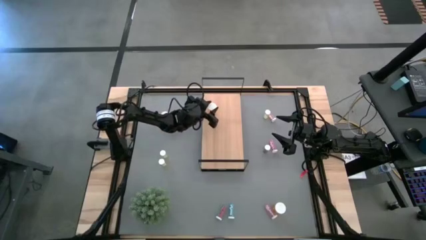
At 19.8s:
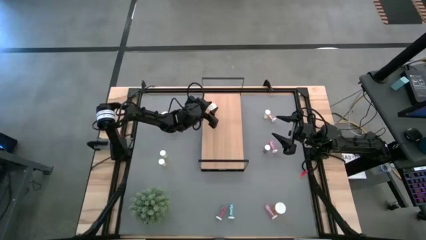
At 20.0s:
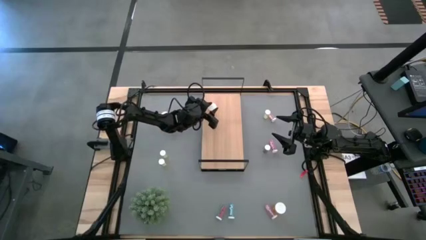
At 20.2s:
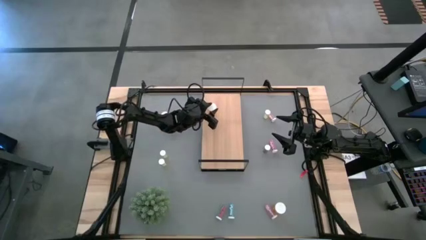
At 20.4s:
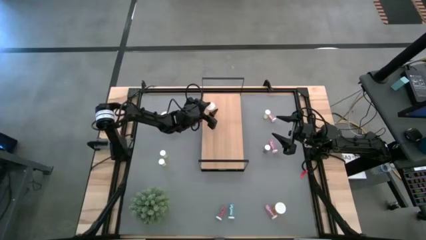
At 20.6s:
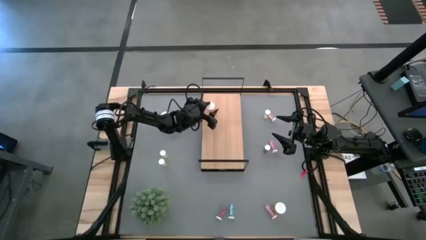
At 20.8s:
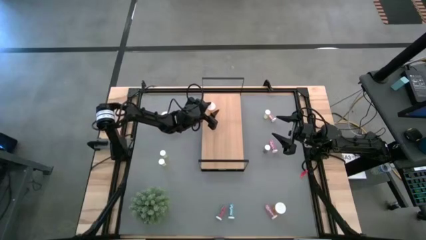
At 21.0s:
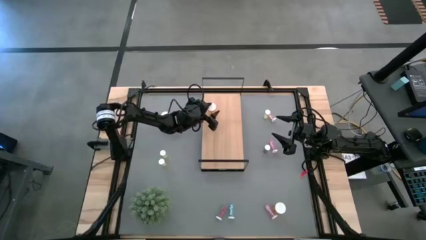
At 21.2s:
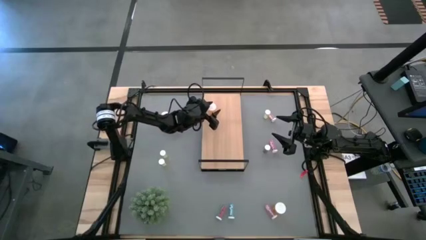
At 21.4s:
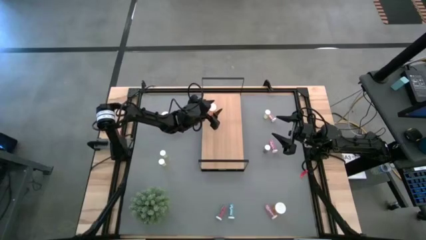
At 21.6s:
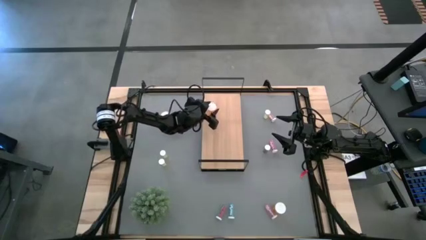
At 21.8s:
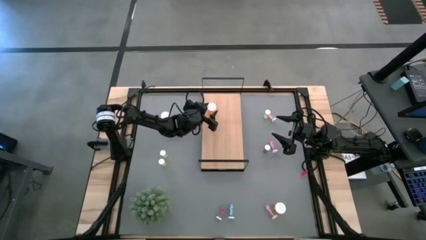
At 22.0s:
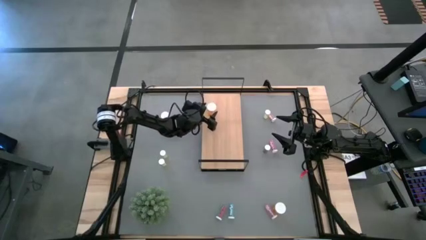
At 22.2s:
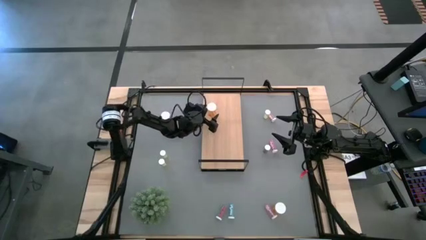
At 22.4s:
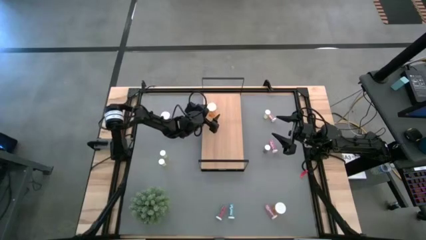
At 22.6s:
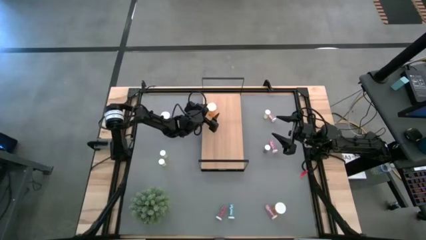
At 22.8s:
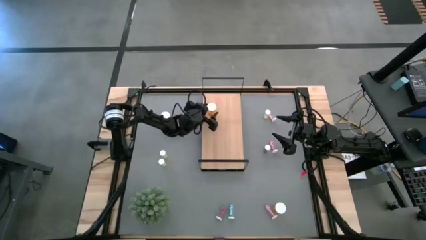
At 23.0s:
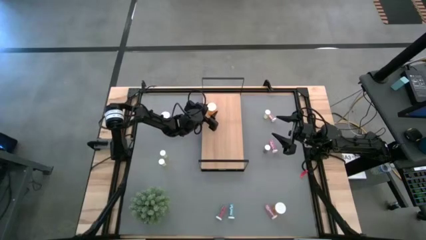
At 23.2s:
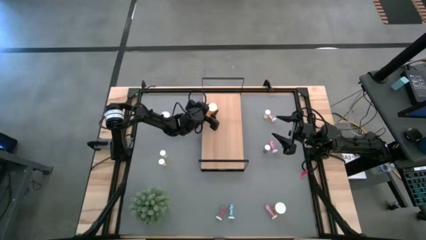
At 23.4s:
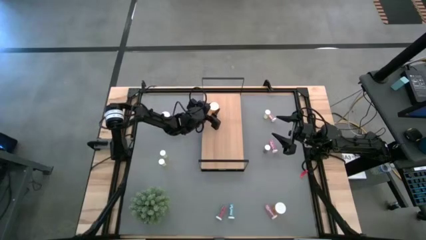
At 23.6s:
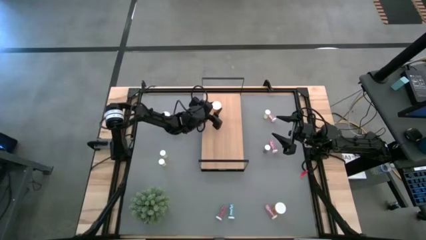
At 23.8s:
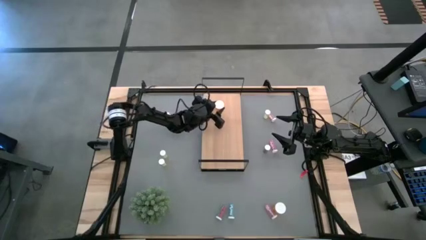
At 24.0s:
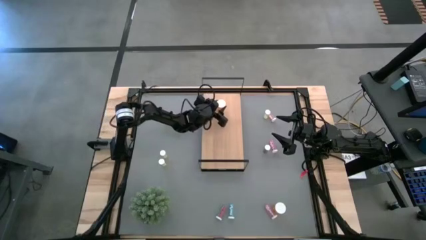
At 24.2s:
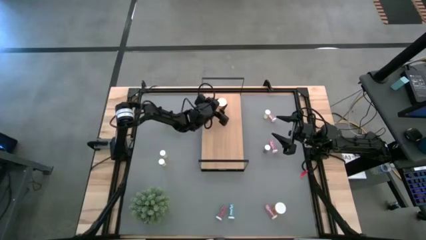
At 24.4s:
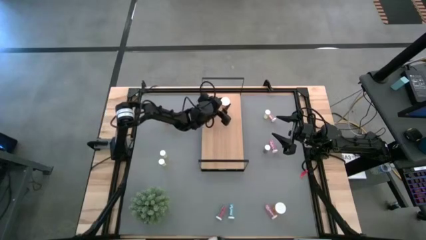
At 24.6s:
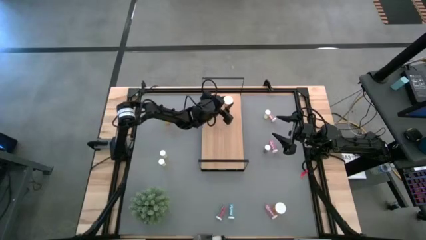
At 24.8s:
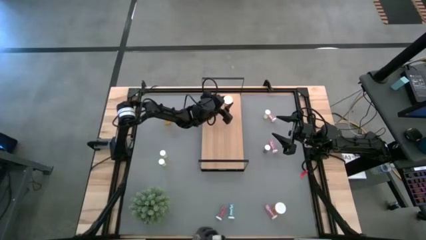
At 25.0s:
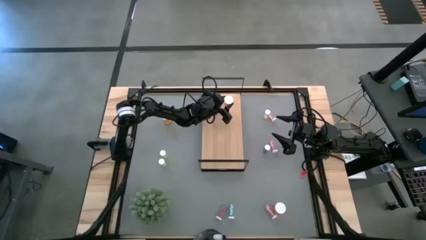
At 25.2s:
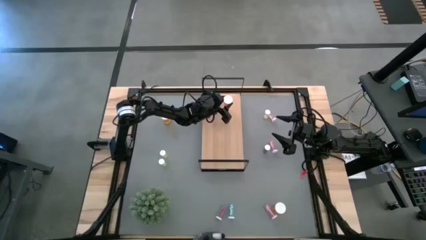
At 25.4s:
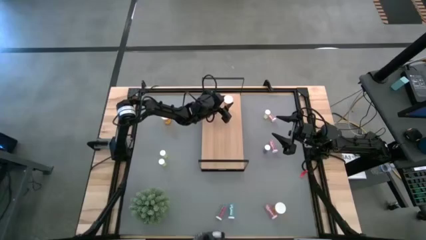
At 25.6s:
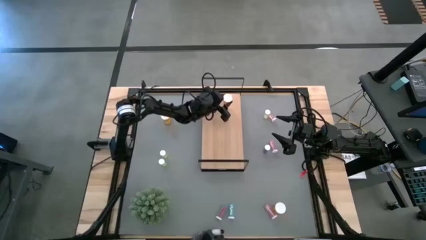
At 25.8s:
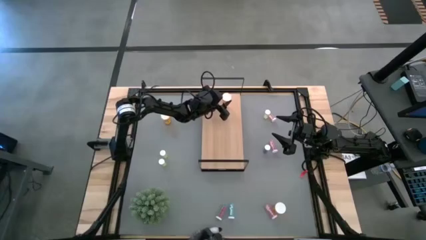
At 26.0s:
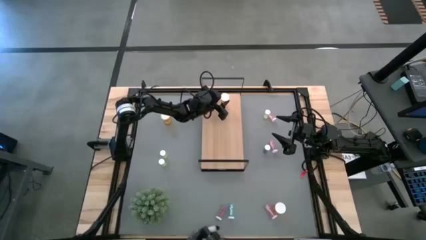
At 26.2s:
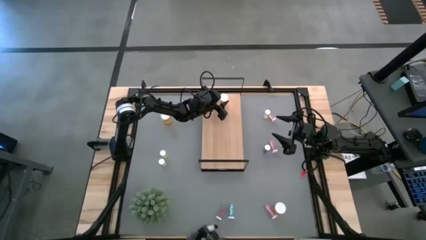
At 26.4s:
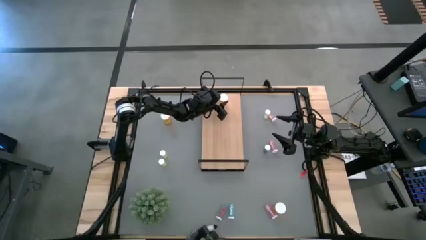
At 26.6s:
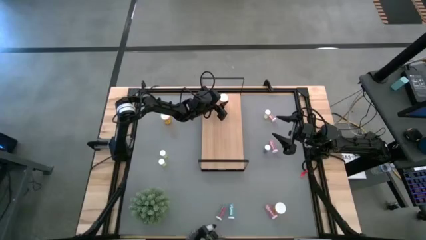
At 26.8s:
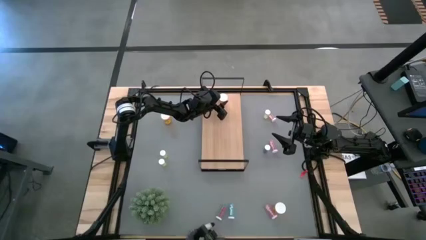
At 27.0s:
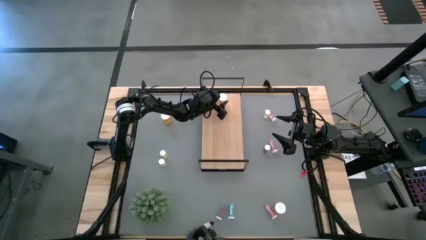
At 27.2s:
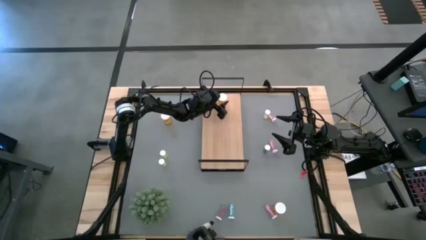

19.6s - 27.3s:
Task: Pick and place medicine bottles onto shelf by color
Put the top right orange pill bottle on the shelf

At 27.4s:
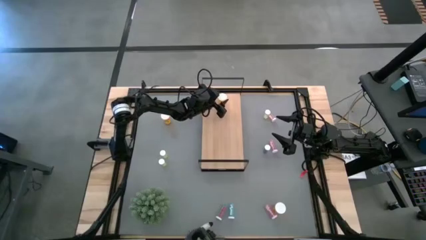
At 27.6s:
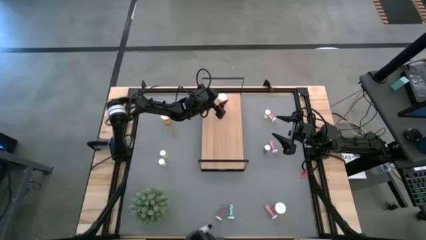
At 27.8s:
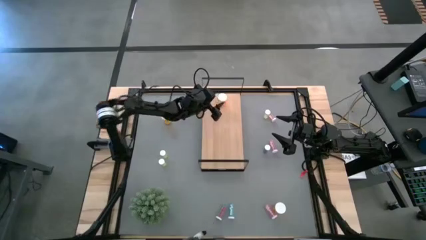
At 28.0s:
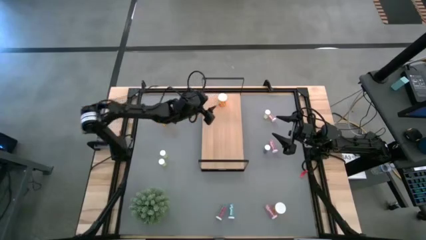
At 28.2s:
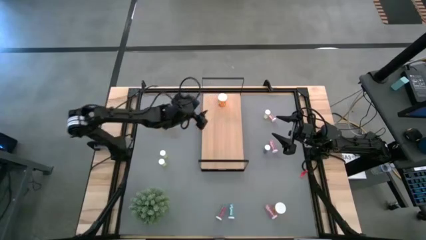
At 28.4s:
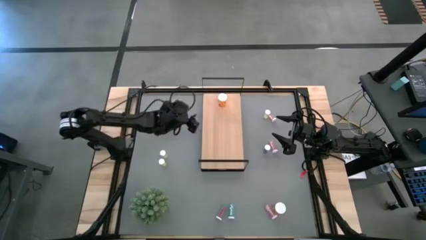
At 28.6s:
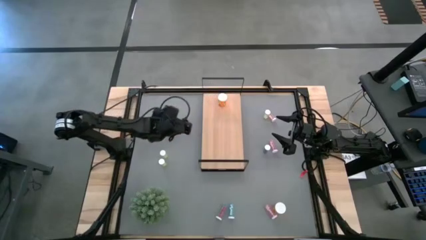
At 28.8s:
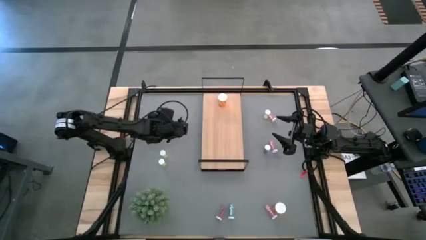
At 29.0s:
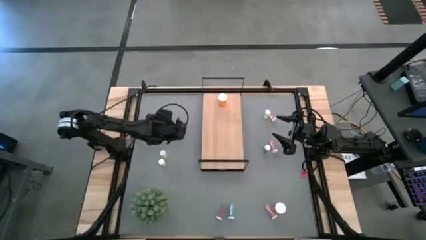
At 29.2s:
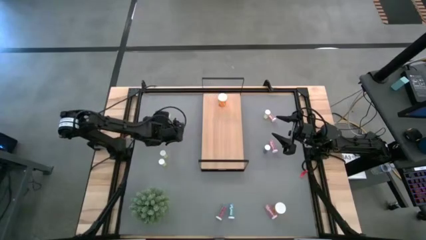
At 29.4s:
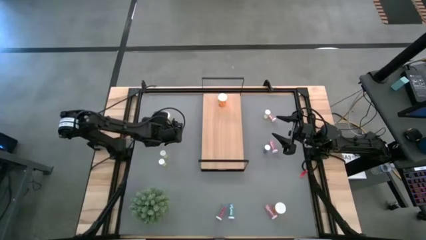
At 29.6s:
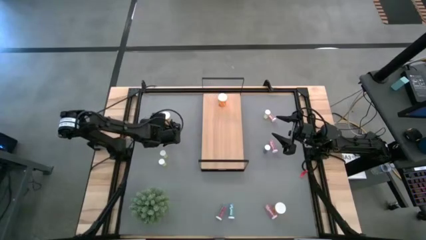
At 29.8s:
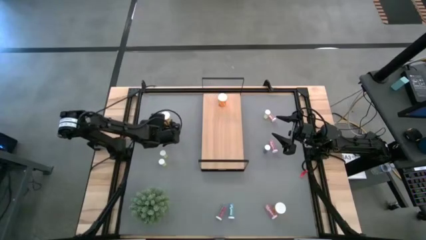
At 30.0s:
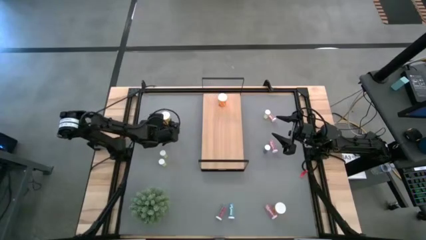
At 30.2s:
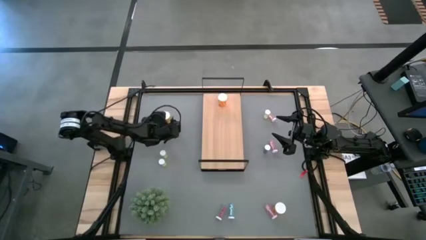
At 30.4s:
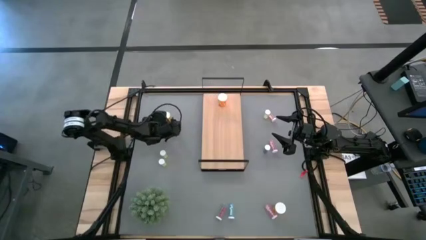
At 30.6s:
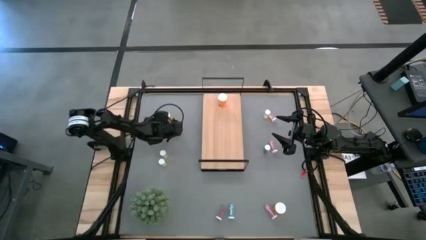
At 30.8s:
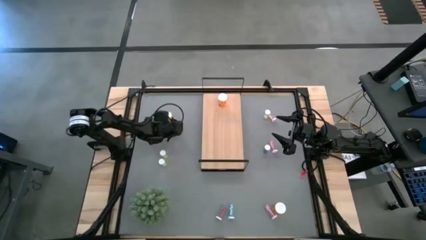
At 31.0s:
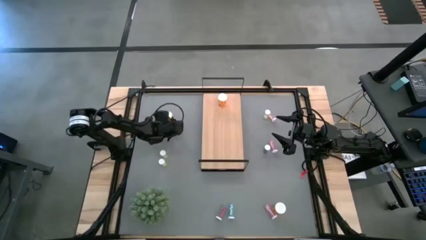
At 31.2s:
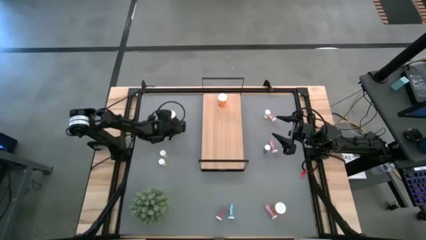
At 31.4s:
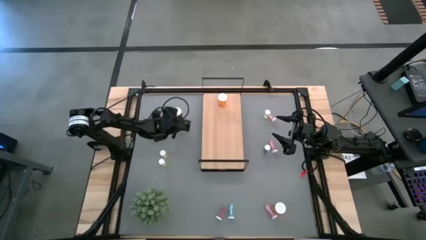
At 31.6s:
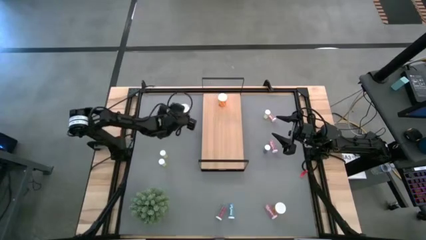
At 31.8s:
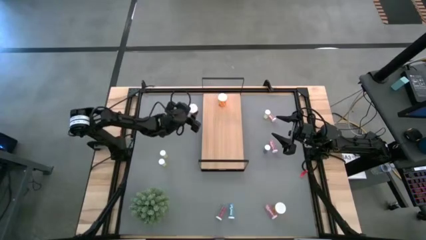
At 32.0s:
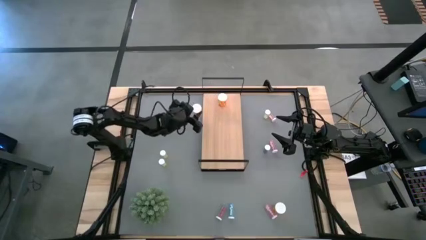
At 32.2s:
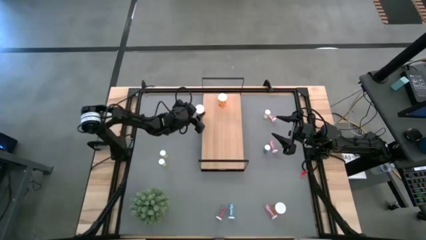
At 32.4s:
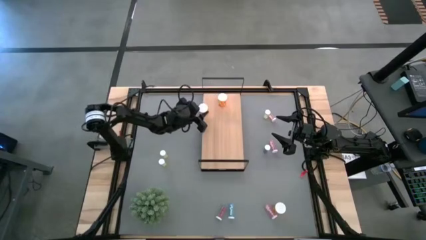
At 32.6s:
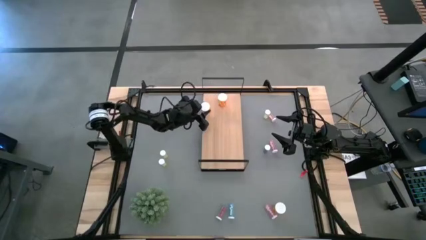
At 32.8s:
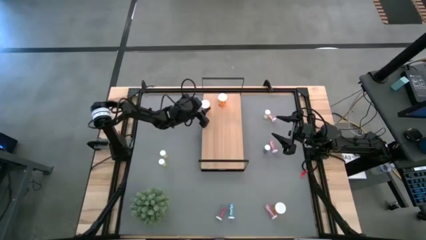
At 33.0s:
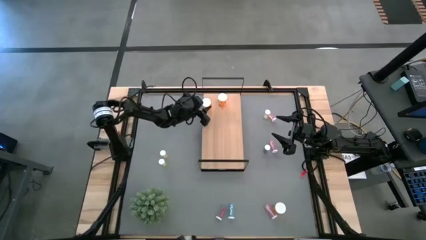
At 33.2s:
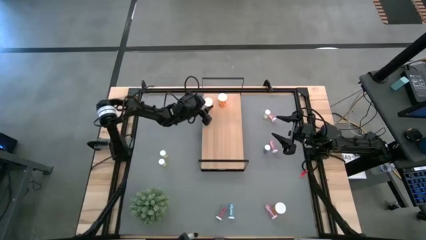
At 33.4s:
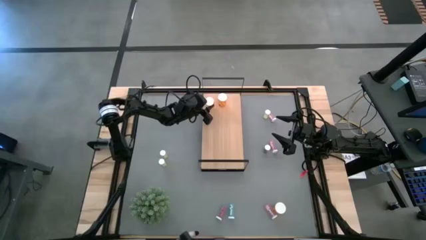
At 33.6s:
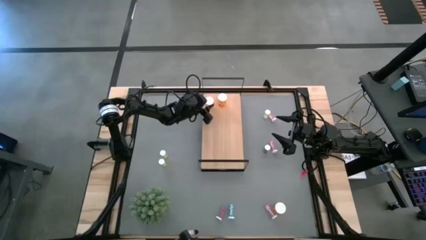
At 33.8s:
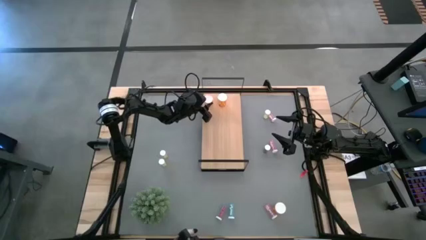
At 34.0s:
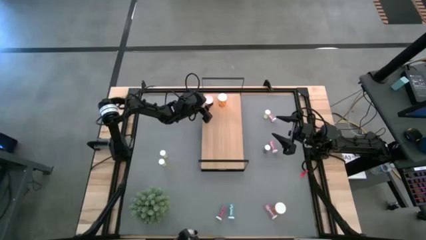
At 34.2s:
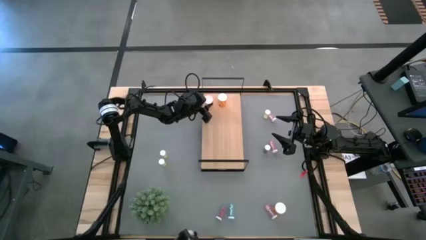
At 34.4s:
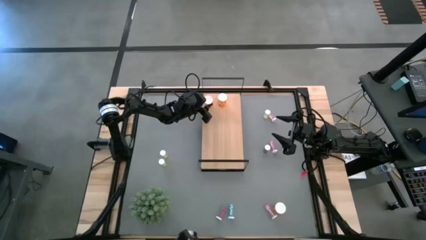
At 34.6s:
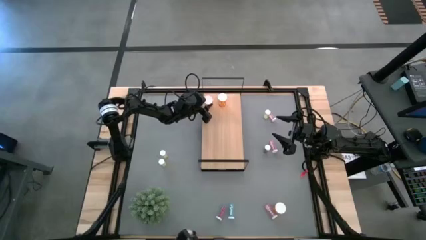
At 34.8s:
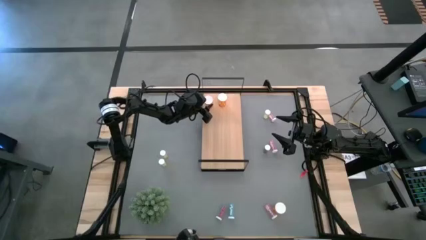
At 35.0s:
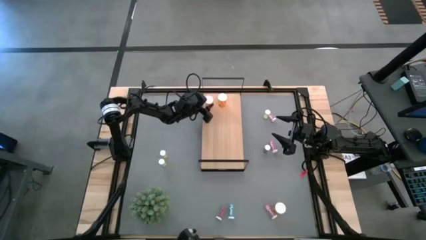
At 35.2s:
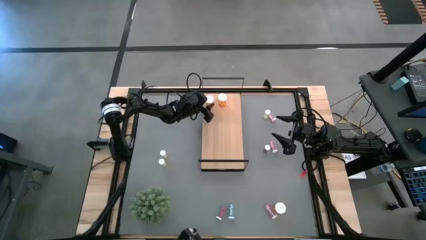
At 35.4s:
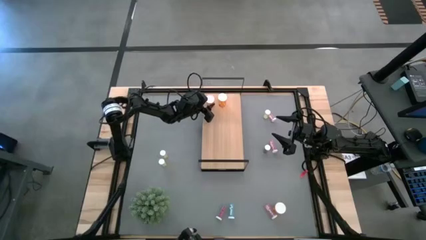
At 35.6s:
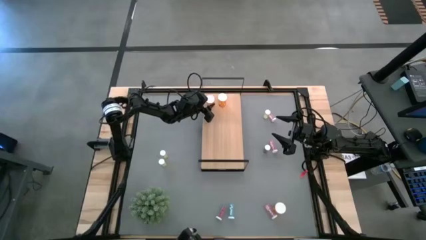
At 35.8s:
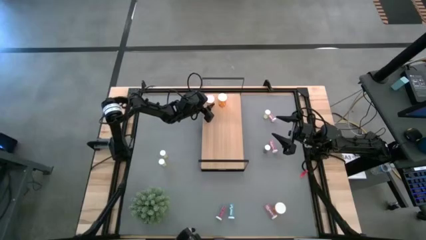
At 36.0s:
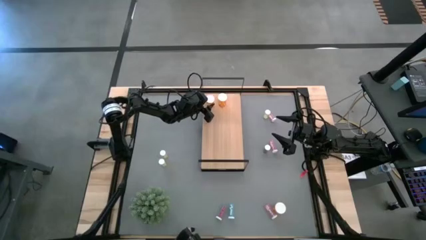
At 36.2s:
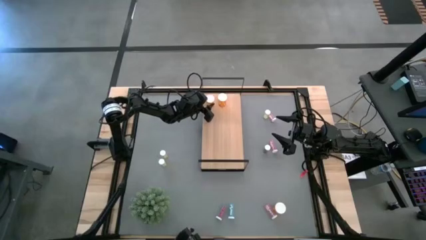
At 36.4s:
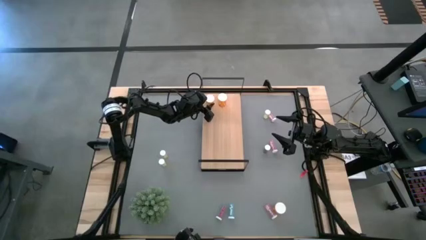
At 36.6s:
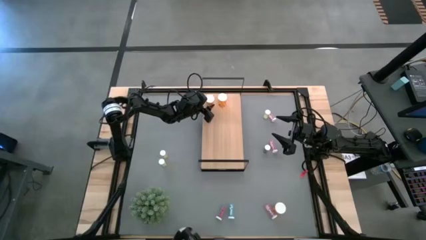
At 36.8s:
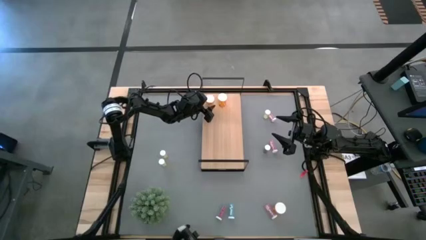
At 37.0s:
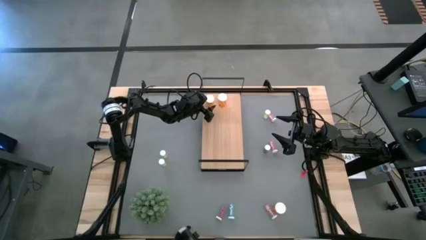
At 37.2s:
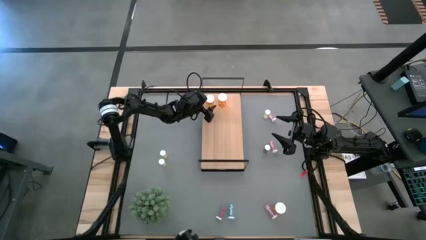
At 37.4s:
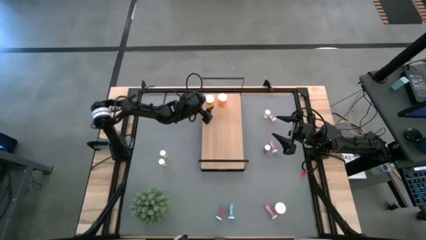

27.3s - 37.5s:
Put the top orange pill bottle on the shelf aligned with the other orange pill bottle
